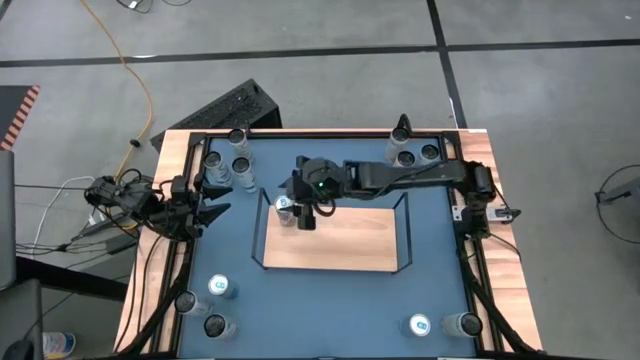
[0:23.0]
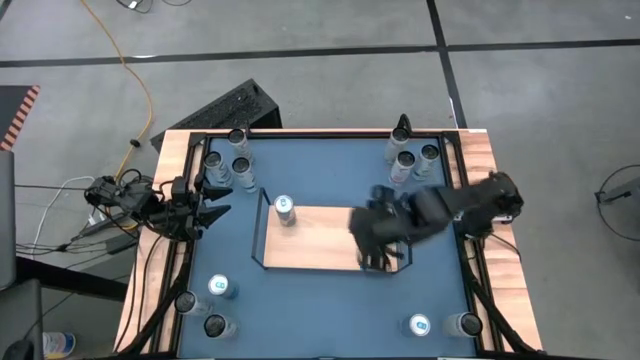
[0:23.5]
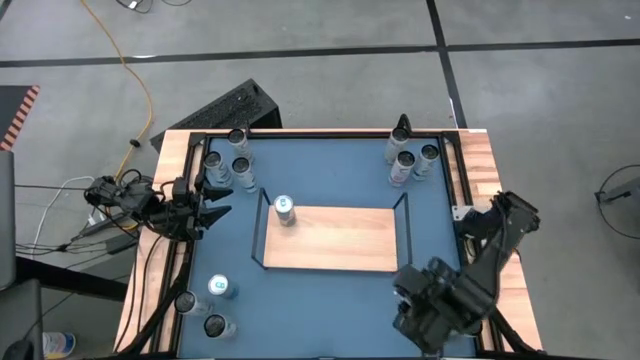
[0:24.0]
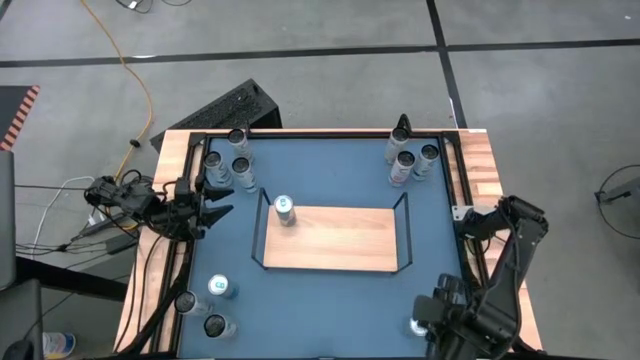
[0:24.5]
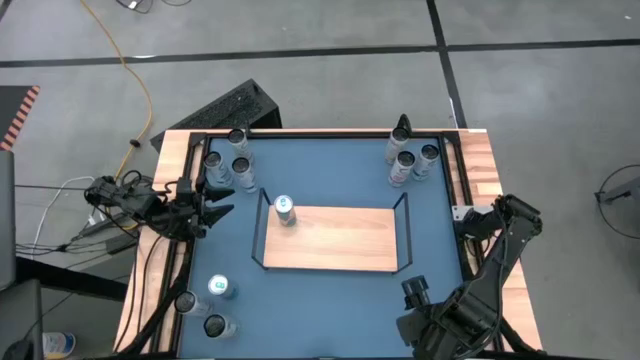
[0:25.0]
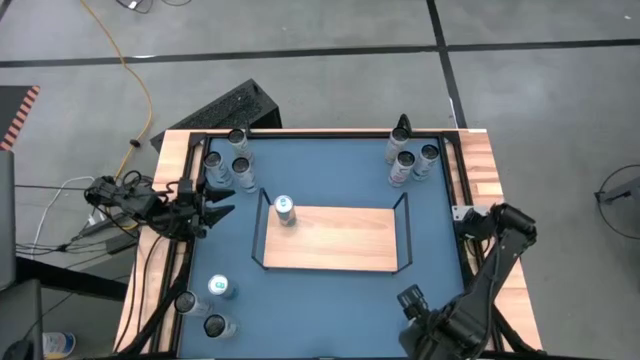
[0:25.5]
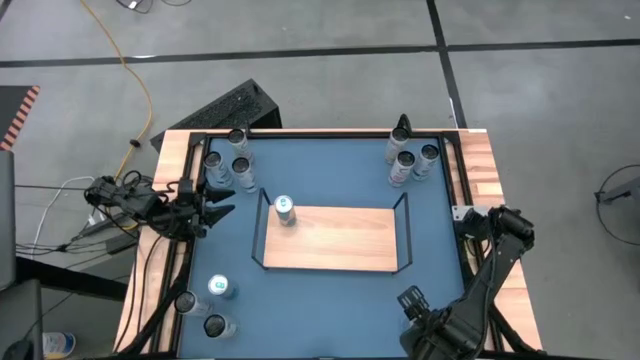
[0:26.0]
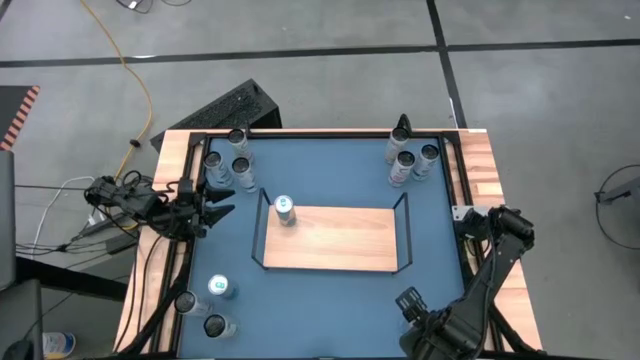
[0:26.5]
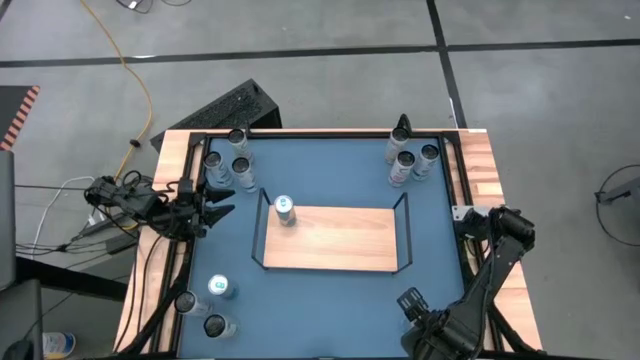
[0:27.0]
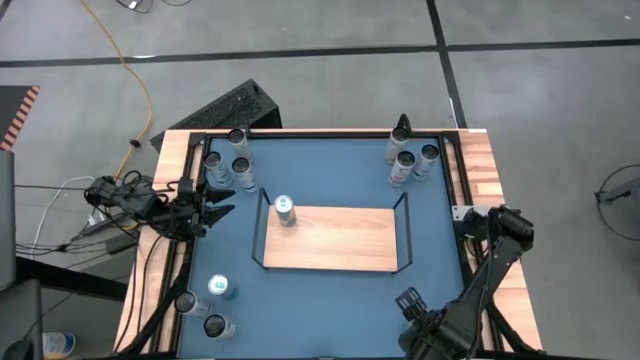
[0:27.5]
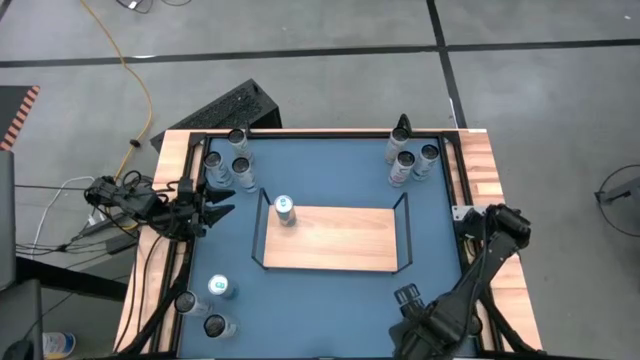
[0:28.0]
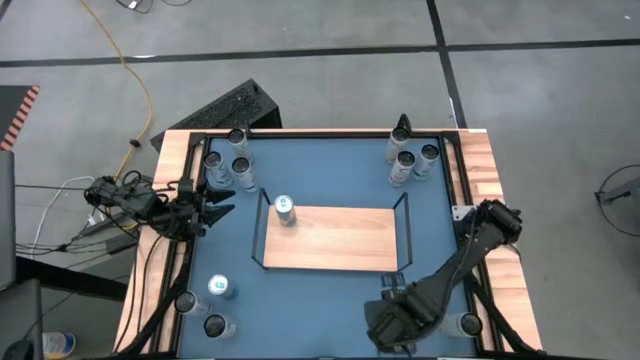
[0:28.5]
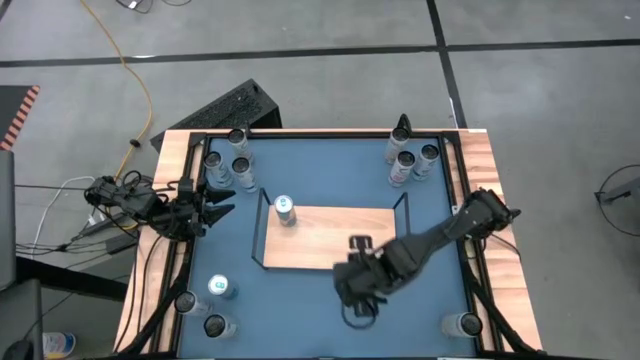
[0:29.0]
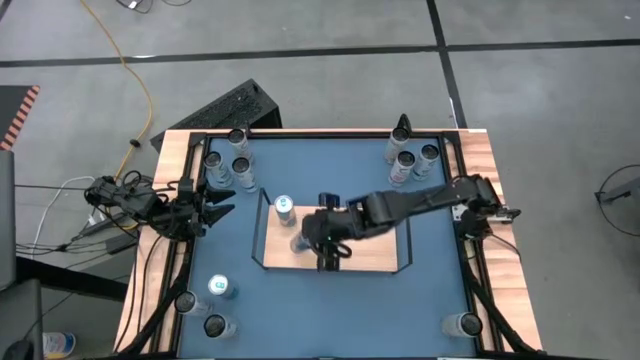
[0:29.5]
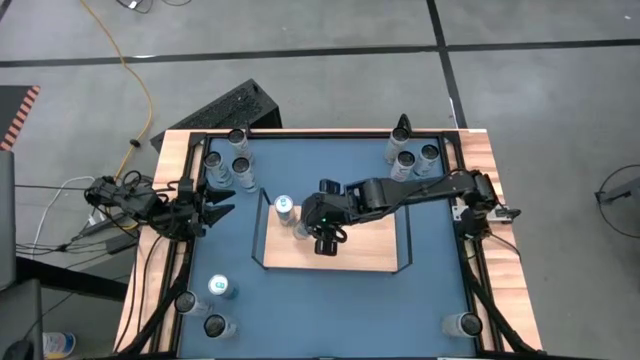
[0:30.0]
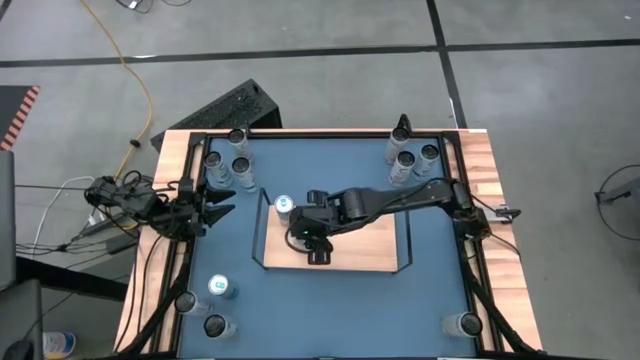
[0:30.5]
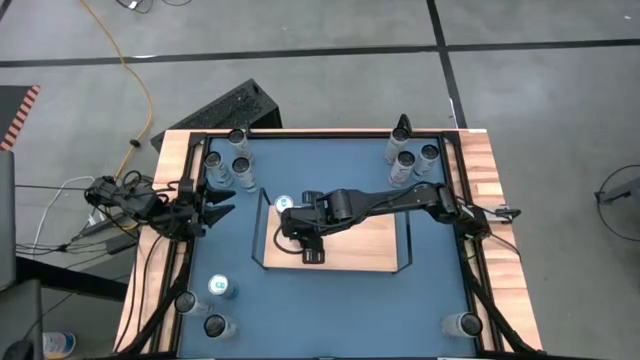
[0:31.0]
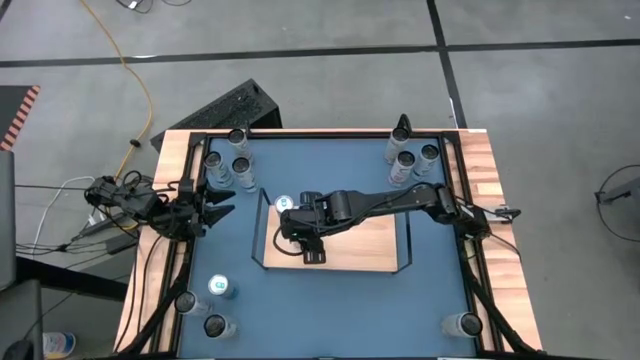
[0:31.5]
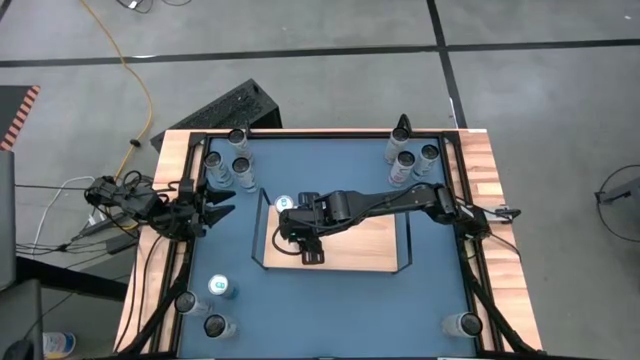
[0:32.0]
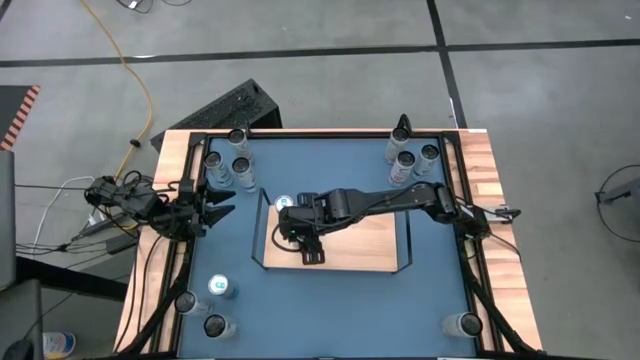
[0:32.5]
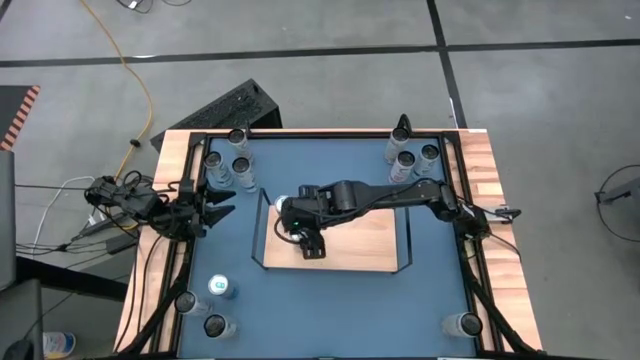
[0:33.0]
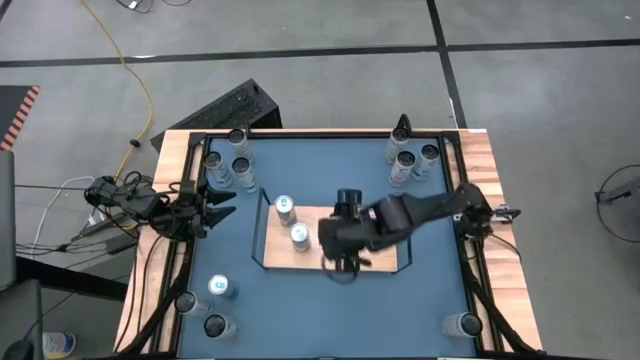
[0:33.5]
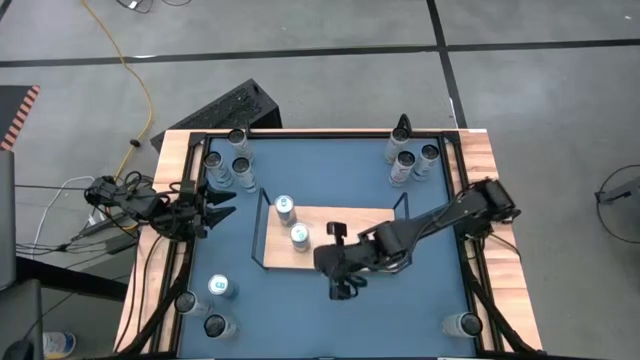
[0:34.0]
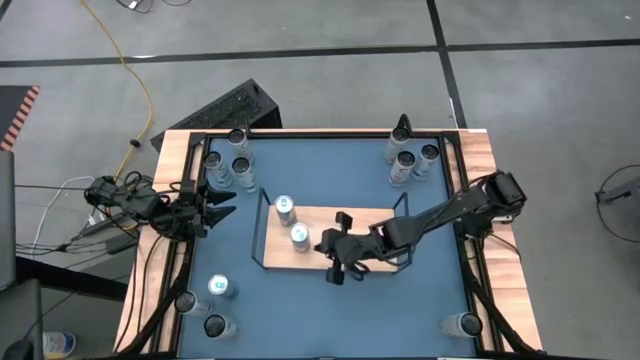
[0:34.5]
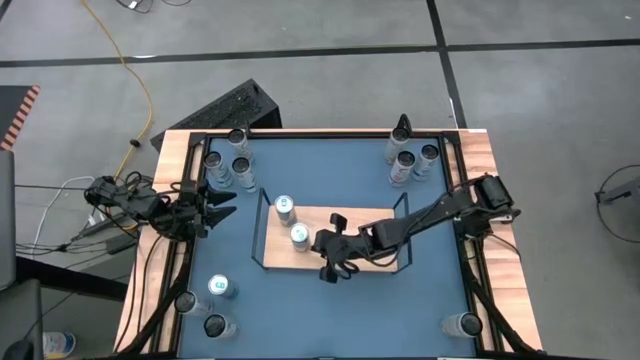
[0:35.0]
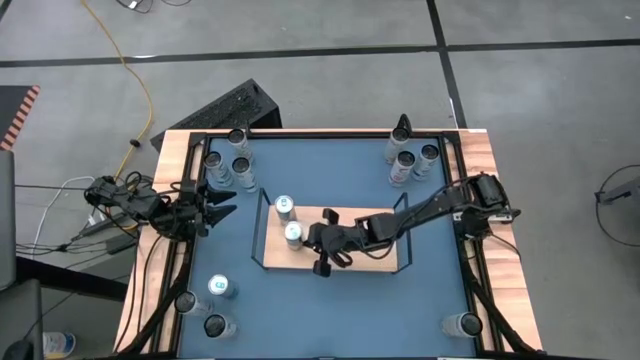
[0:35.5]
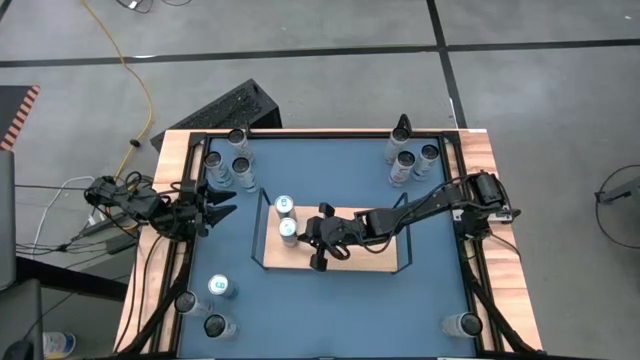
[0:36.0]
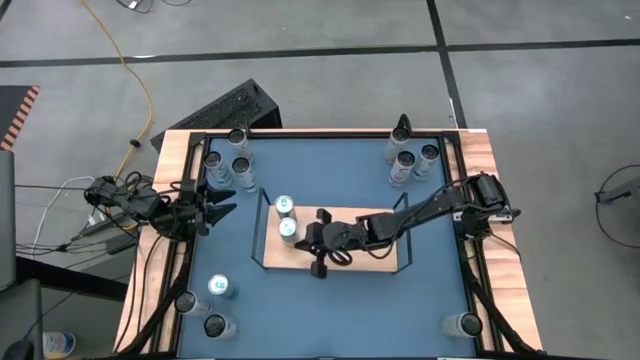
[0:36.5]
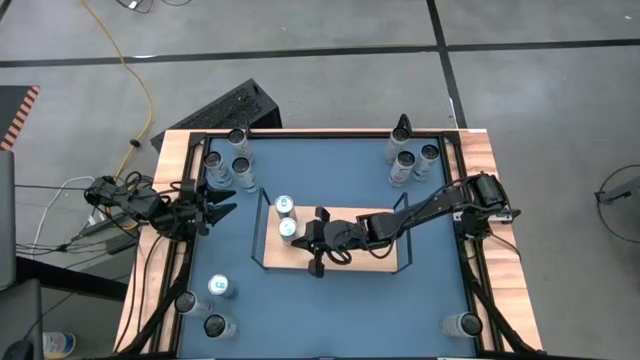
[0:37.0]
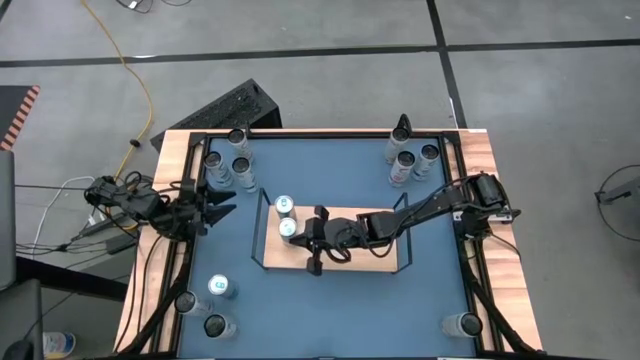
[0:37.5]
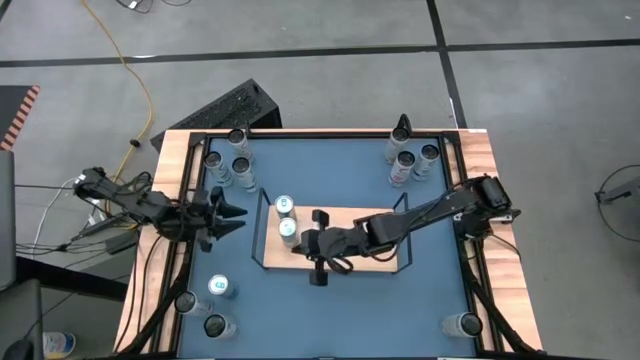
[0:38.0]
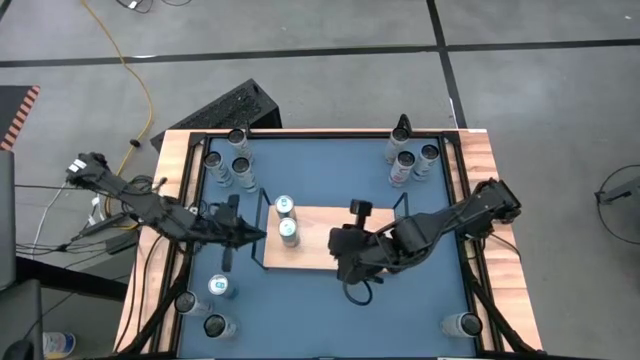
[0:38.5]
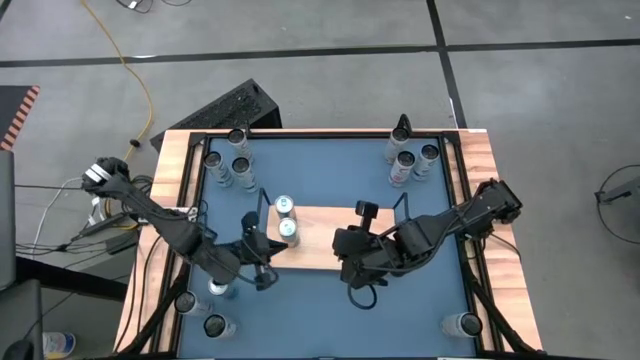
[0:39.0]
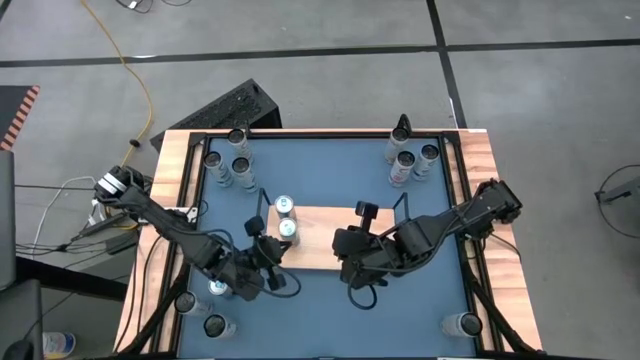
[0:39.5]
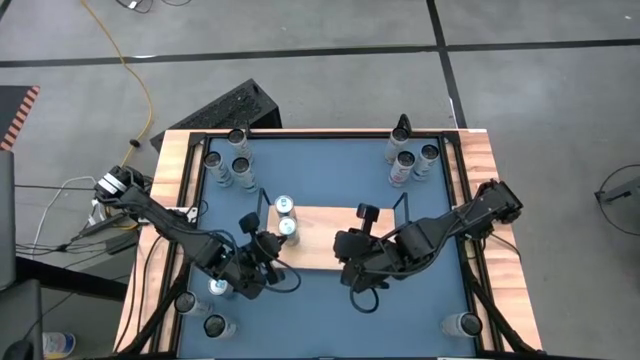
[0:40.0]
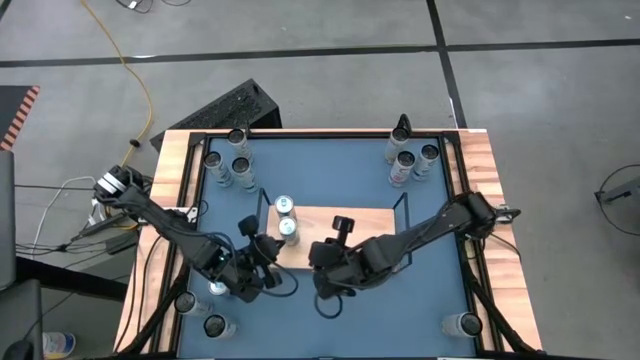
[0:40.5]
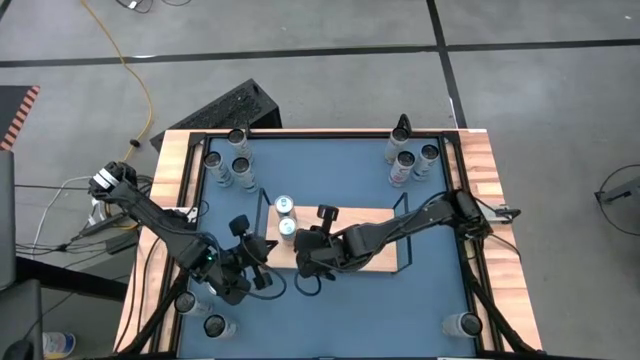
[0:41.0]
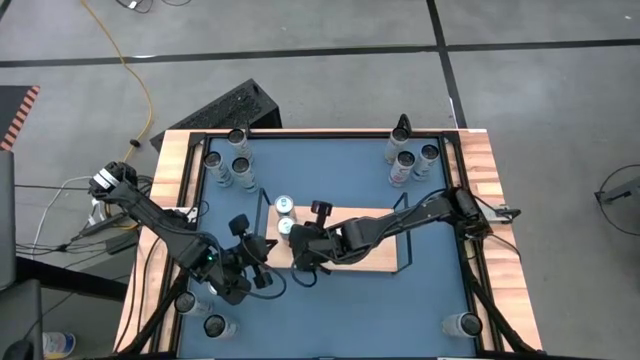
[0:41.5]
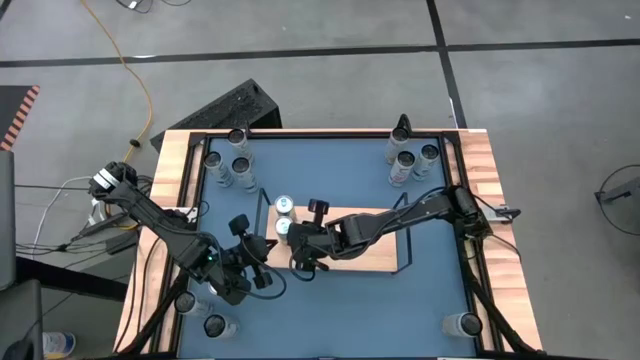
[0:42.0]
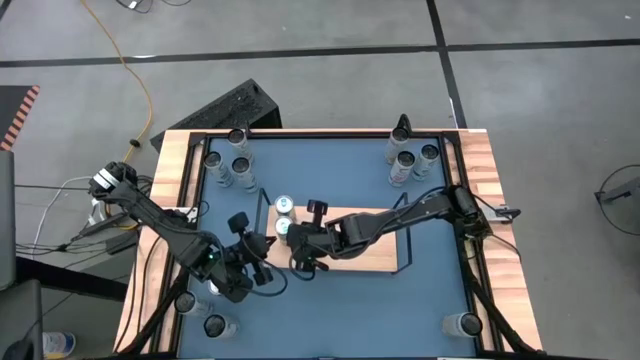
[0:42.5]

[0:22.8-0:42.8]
Task: Place canned beverage on shelf
Put the right blue soda can on the shelf aligned with the other blue soda can

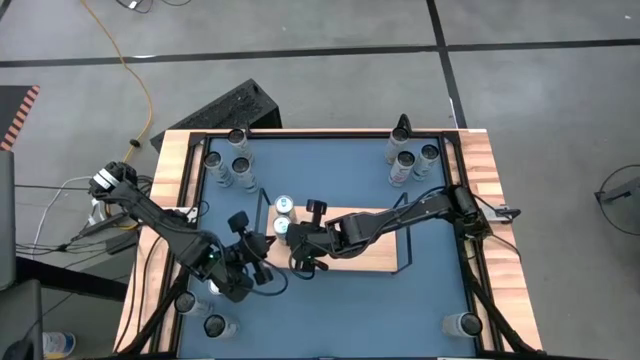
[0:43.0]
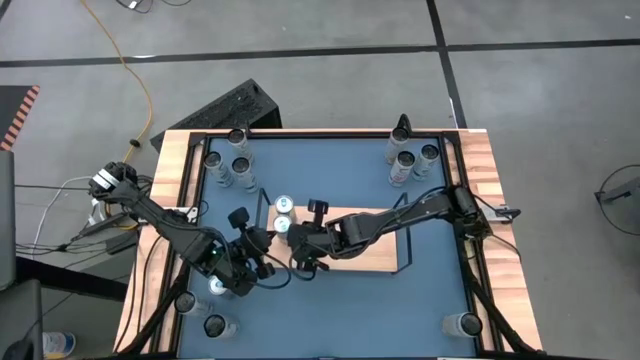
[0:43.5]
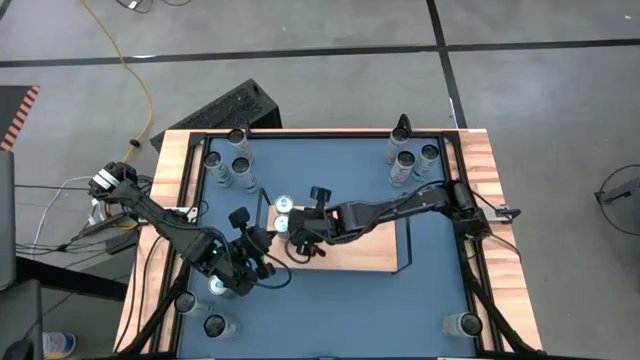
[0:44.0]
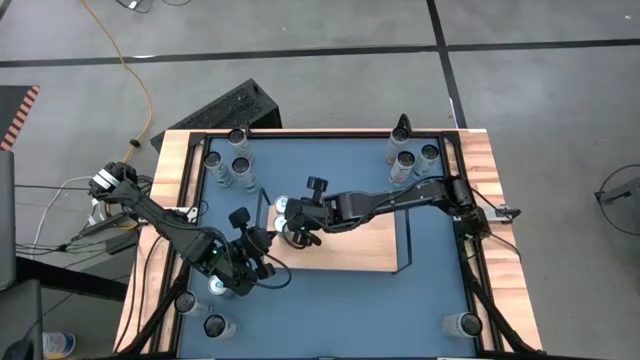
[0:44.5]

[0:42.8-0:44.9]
Adjust the blue soda cans on the shelf
